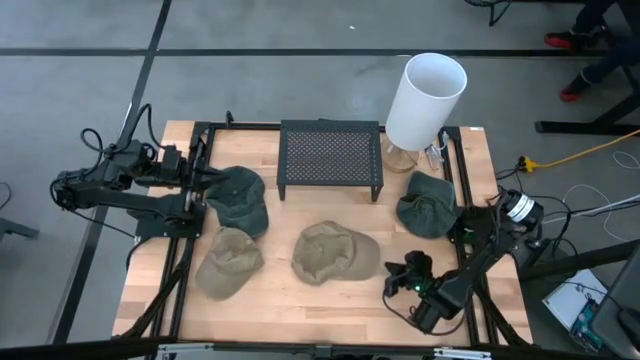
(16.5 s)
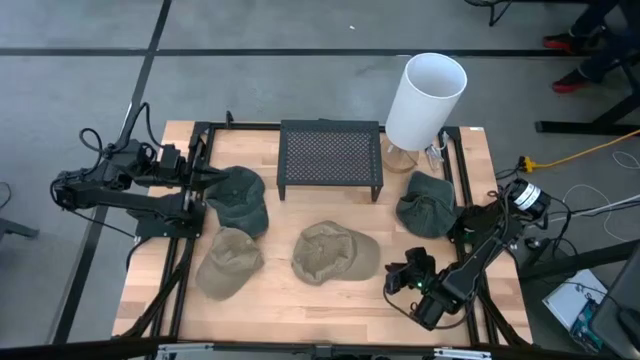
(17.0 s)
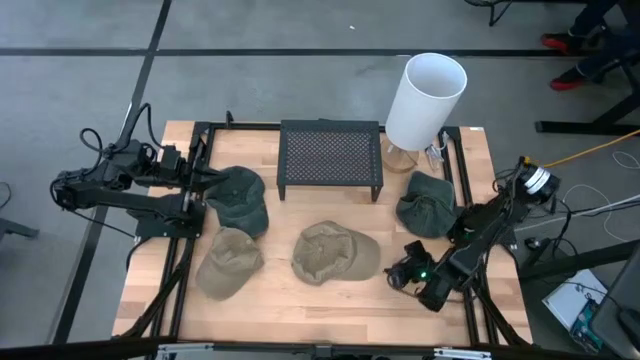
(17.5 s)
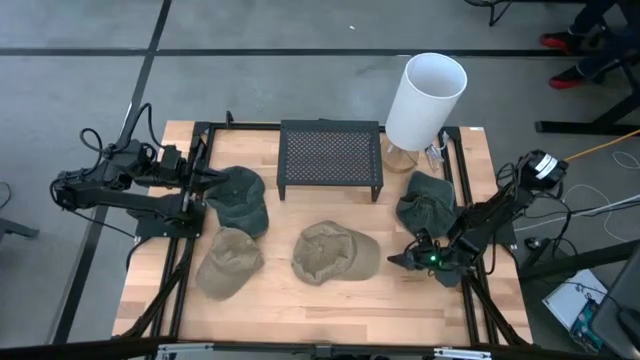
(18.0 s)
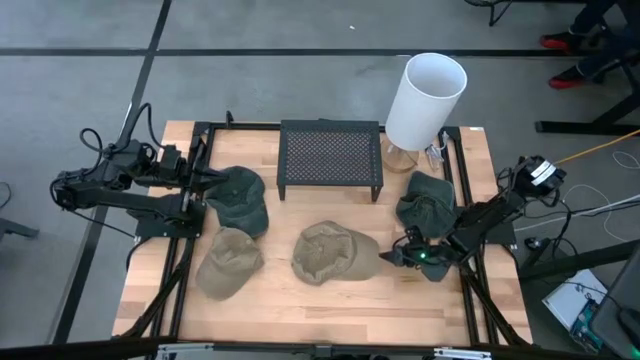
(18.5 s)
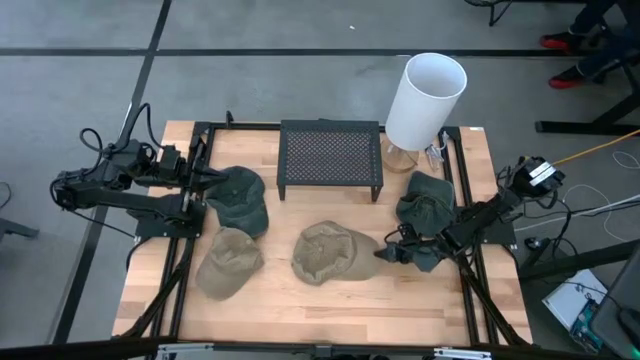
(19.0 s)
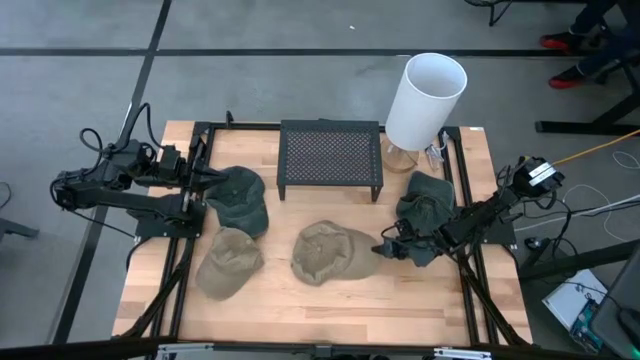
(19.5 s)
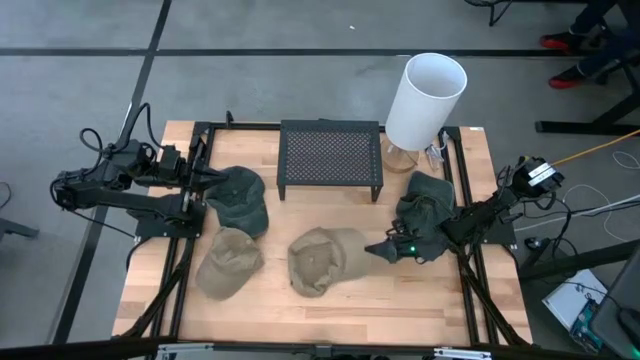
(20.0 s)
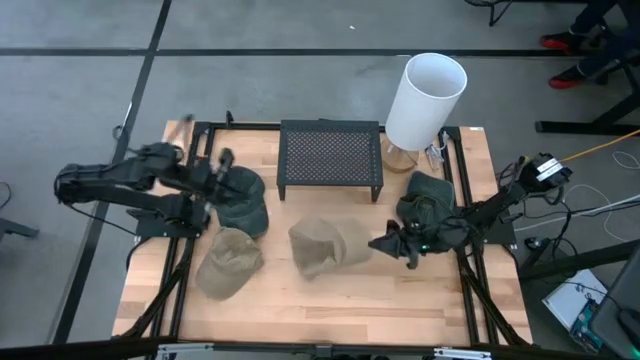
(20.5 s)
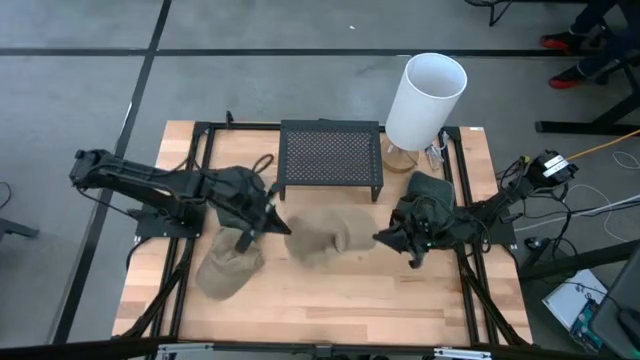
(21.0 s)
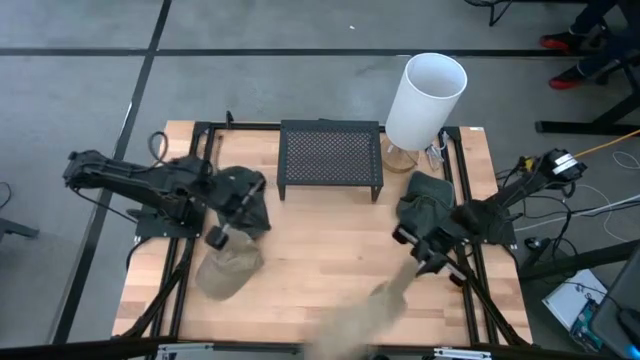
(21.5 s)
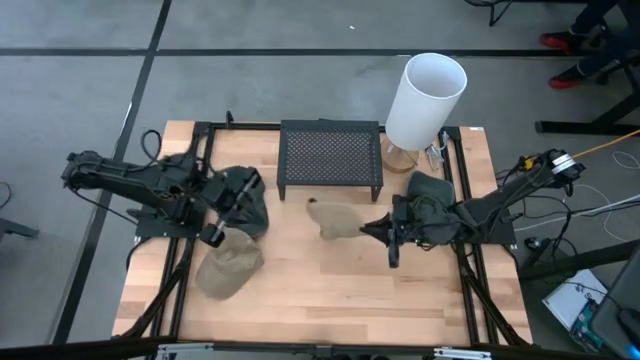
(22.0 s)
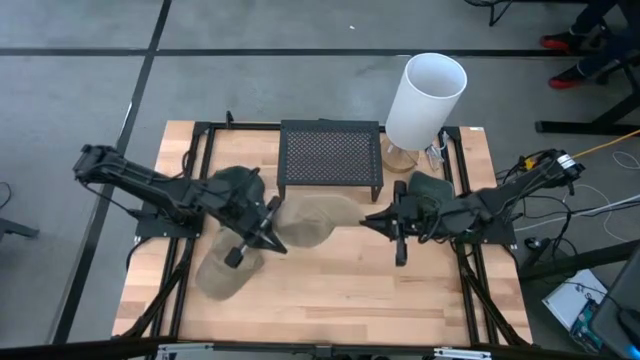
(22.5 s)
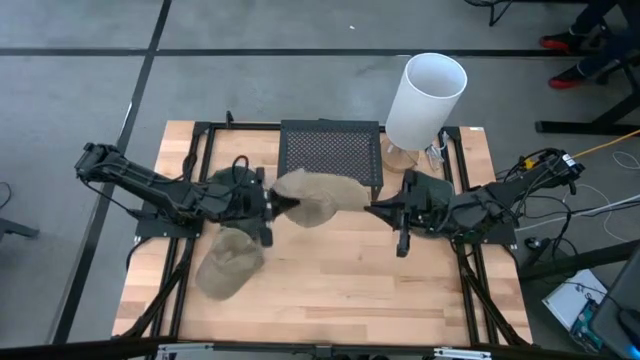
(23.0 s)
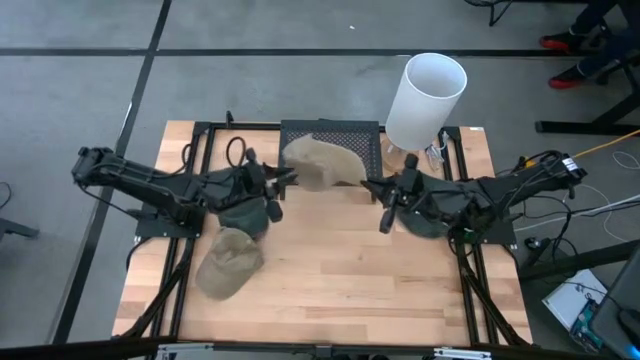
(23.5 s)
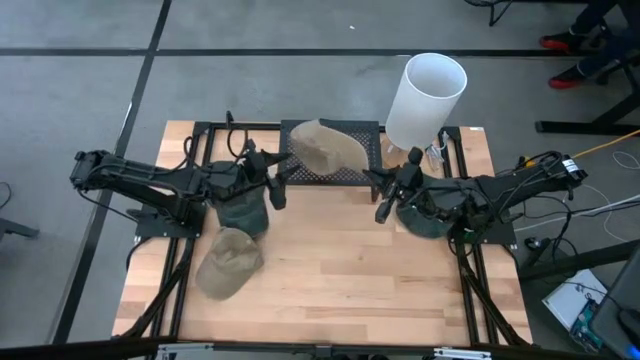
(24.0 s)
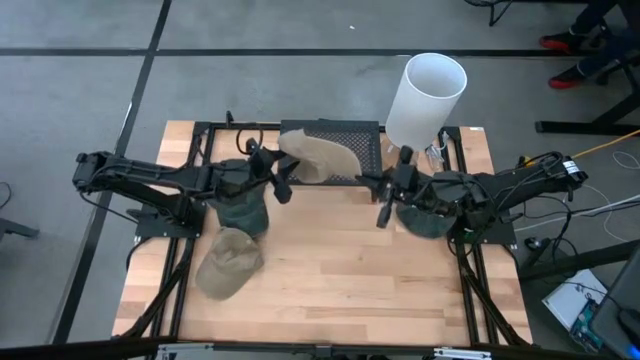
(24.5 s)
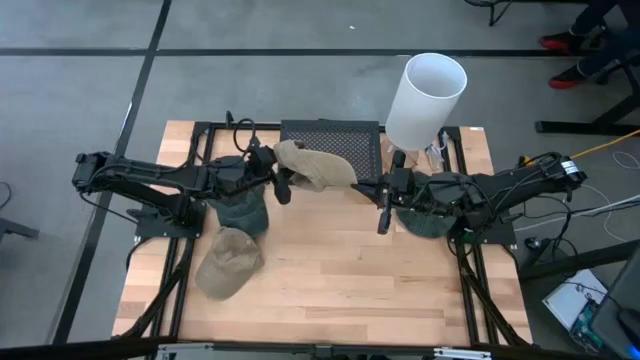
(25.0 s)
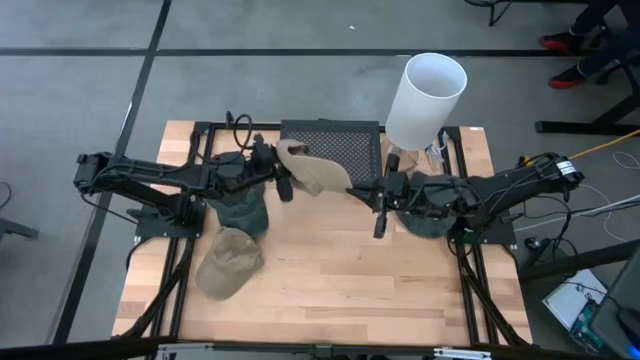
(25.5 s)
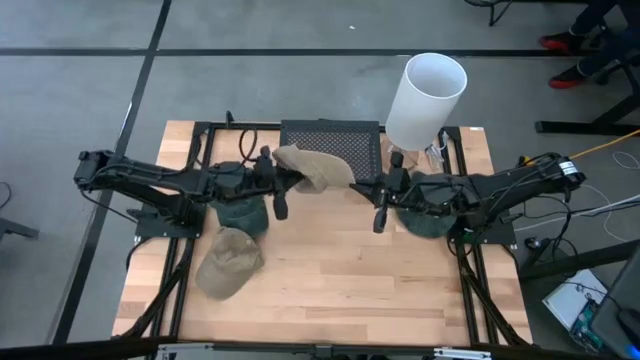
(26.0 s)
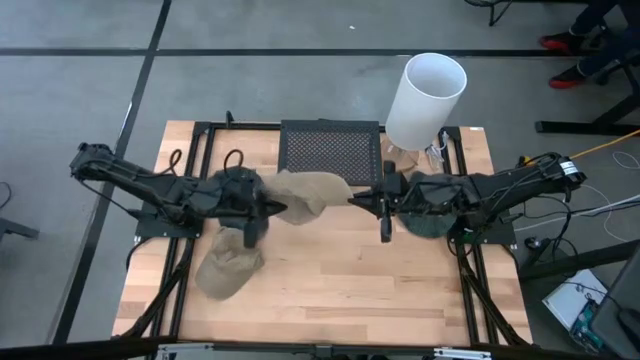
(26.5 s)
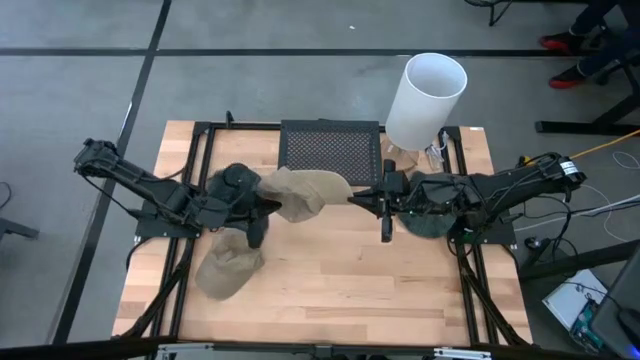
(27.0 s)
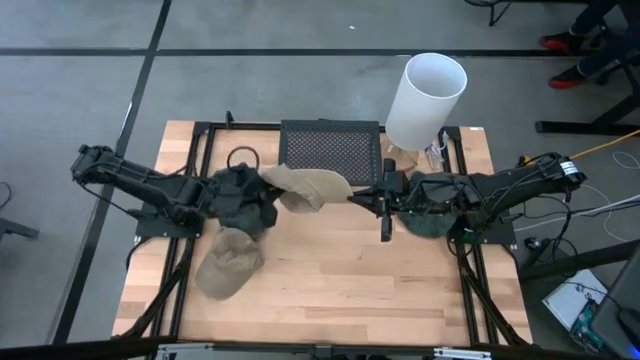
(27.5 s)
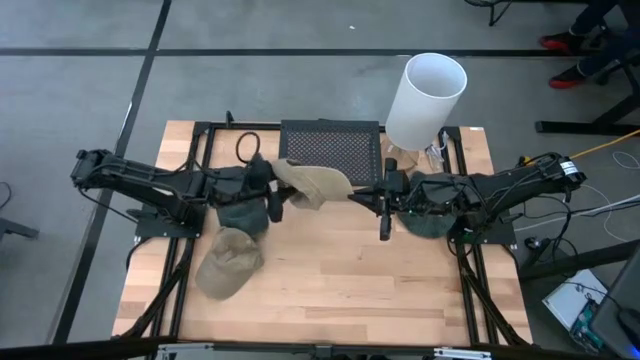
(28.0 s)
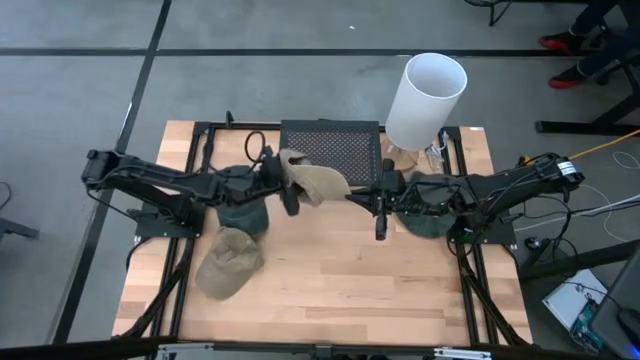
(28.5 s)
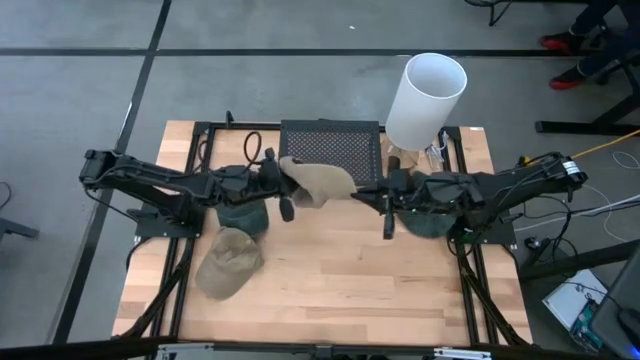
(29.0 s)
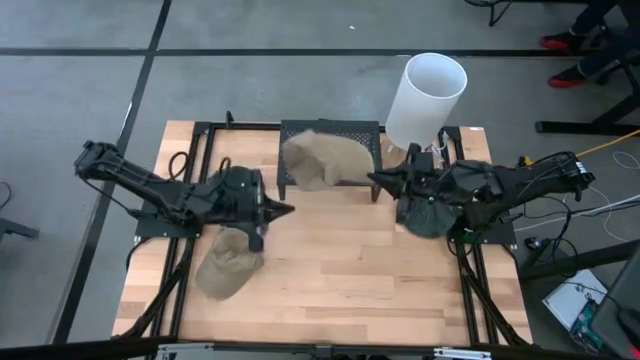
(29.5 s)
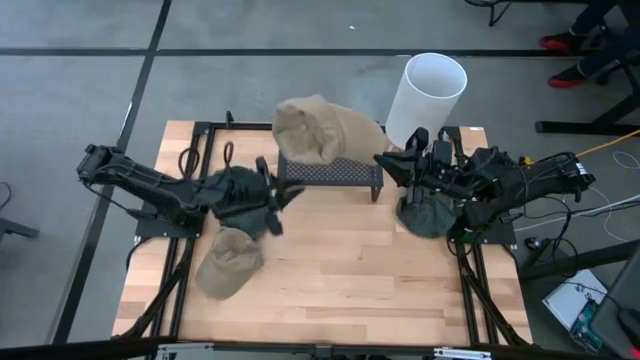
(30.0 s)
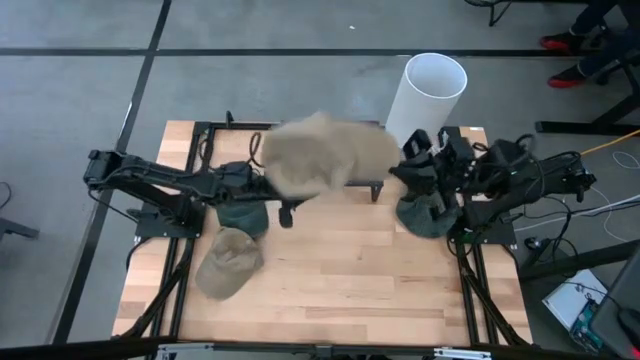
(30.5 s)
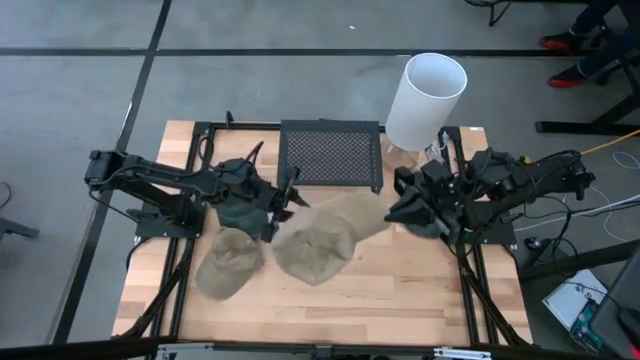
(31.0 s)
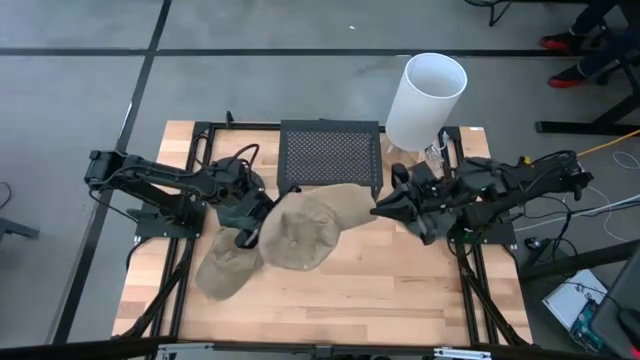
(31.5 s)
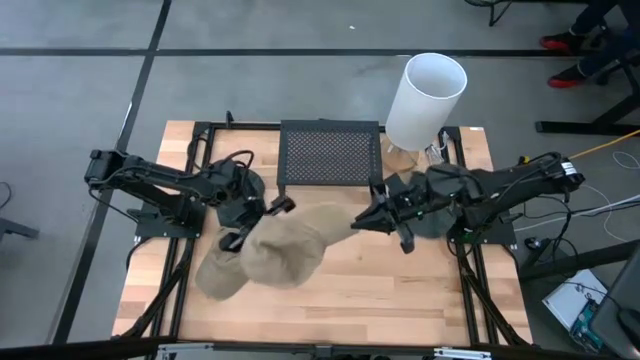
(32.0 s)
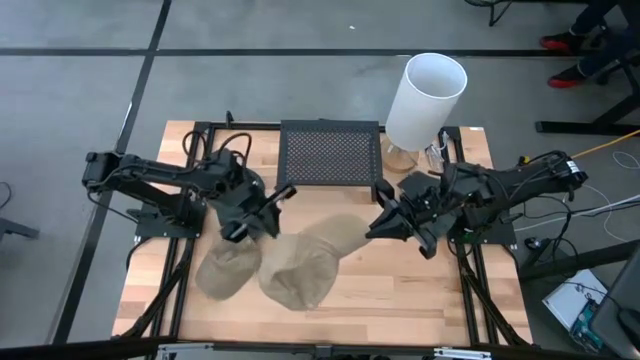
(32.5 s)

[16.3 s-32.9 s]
Task: Pick & Place hat
Put the right brown cap on the shelf

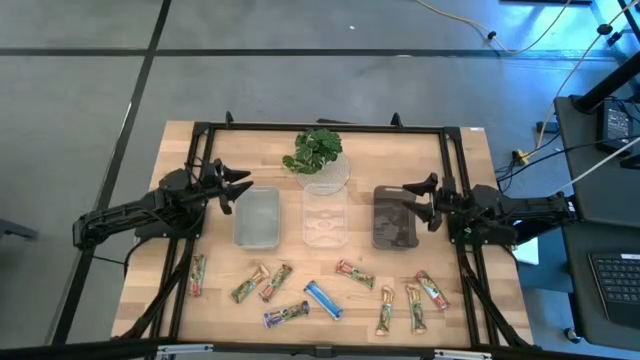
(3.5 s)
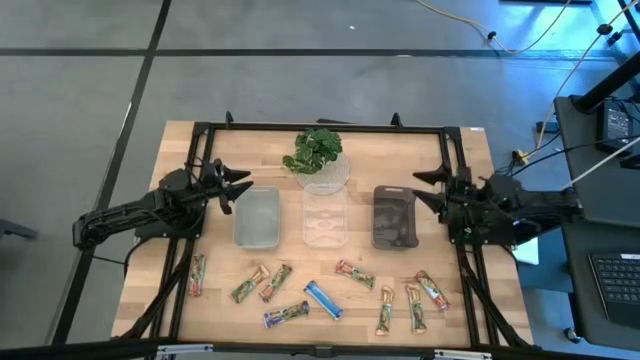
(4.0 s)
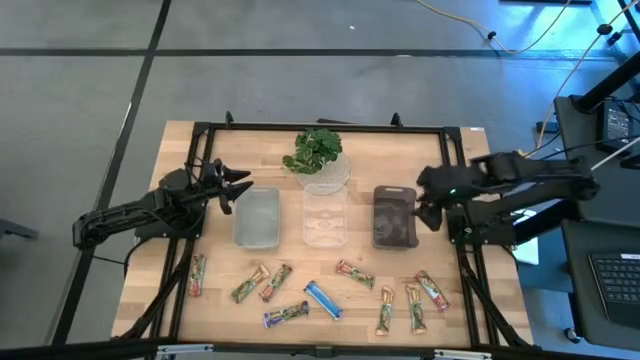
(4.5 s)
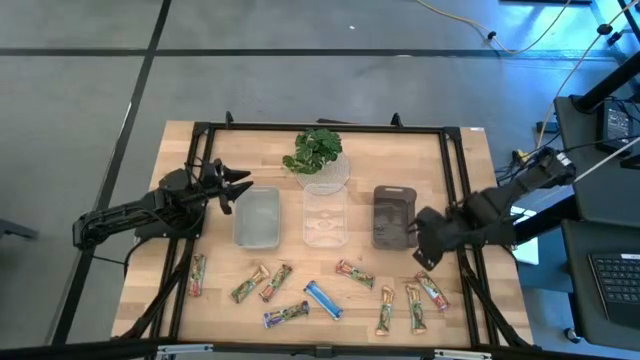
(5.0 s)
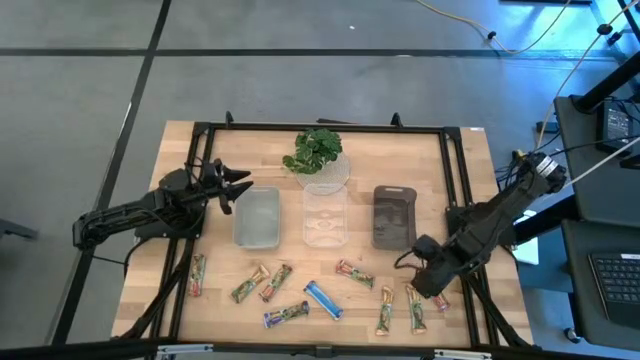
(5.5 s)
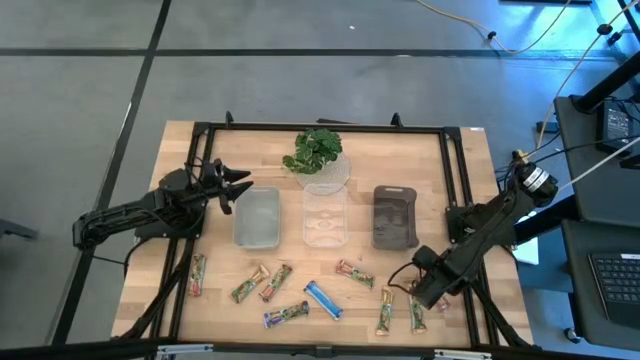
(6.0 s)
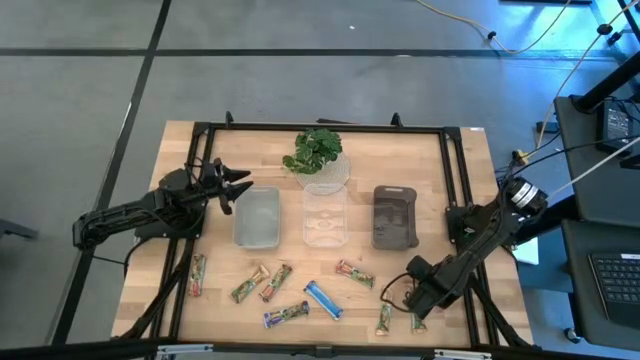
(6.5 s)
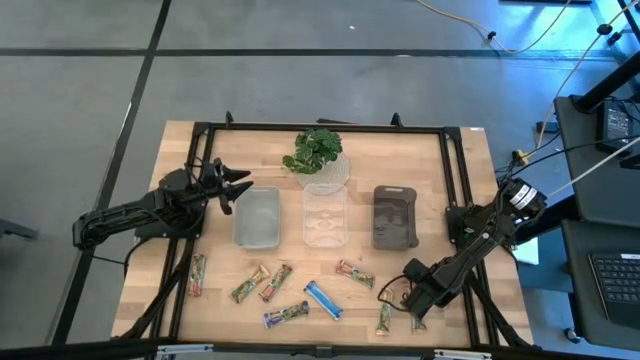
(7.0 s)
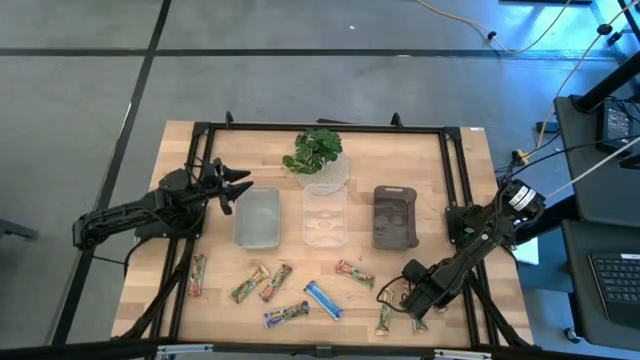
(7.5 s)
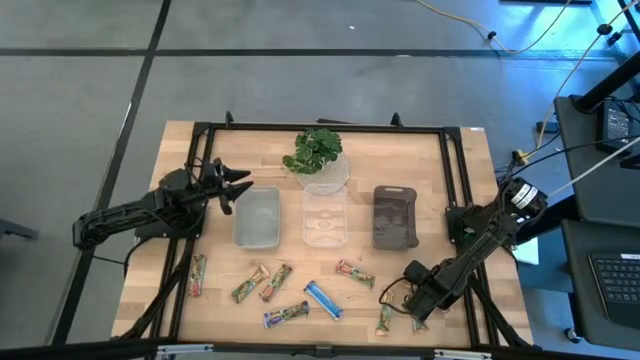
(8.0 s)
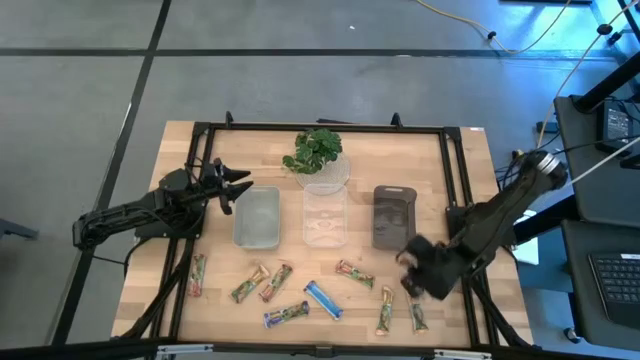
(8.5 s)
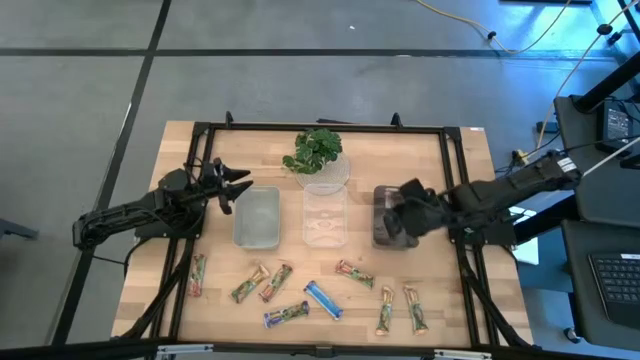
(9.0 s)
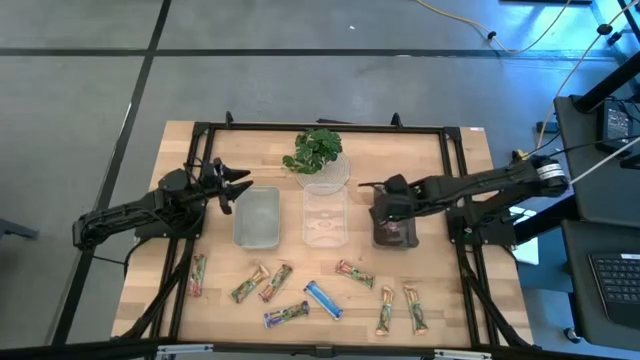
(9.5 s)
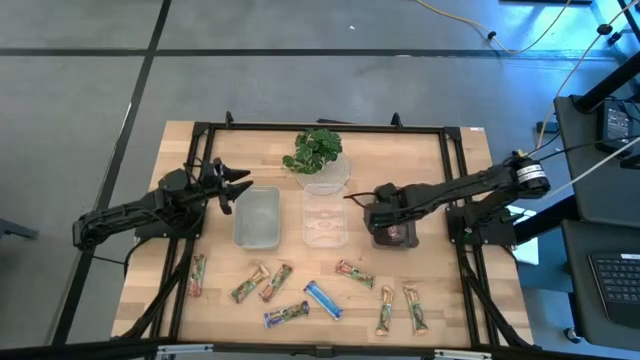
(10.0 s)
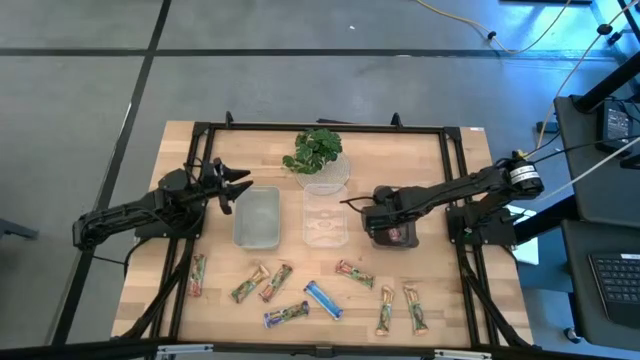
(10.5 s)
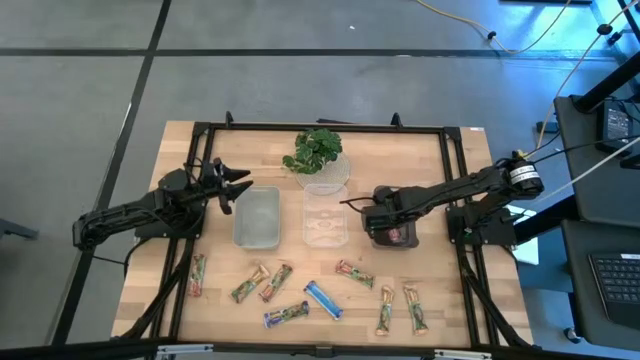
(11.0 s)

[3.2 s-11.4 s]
Task: Pick and place Granola Bars by type
Put the red granola bar into the black transparent bin
